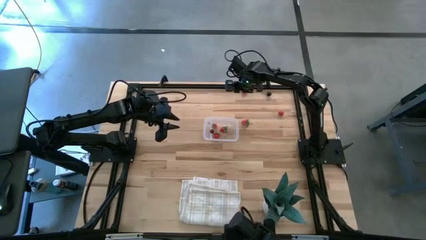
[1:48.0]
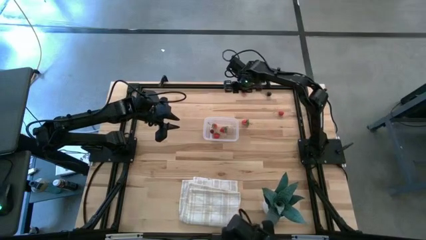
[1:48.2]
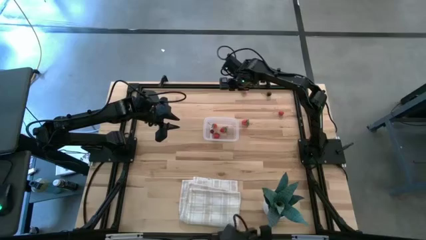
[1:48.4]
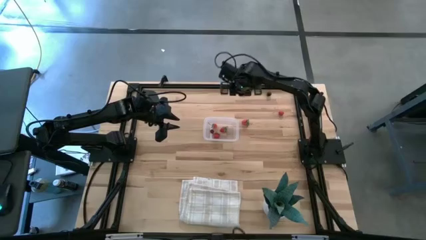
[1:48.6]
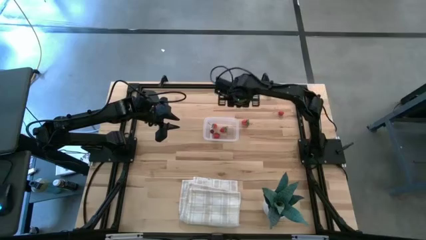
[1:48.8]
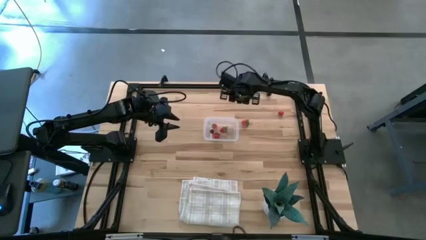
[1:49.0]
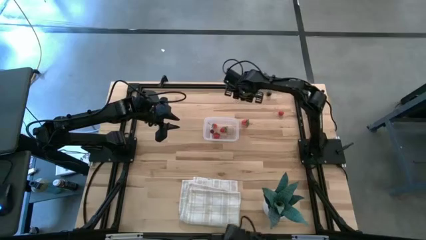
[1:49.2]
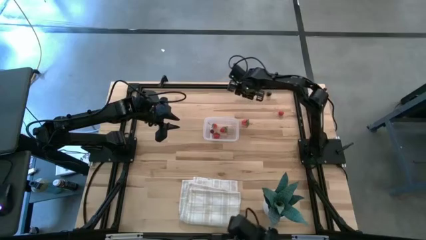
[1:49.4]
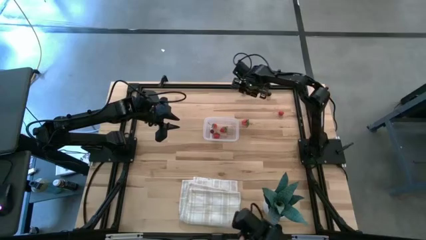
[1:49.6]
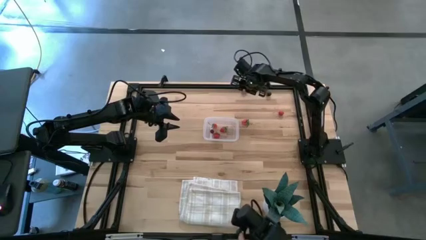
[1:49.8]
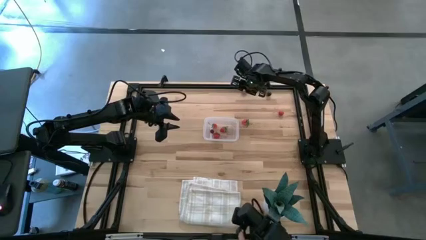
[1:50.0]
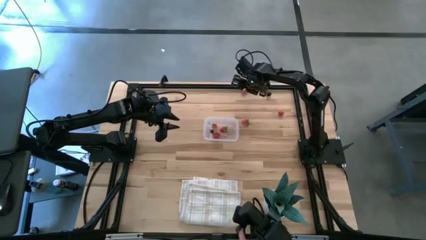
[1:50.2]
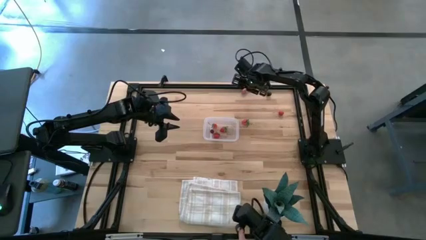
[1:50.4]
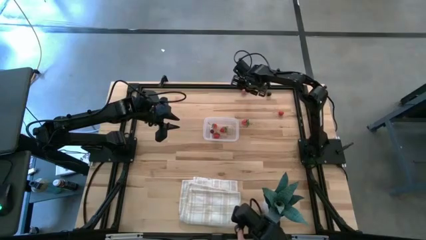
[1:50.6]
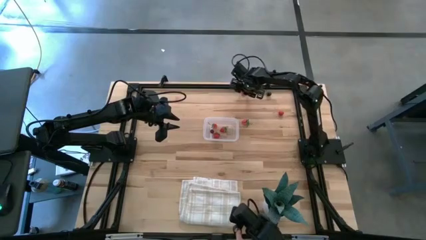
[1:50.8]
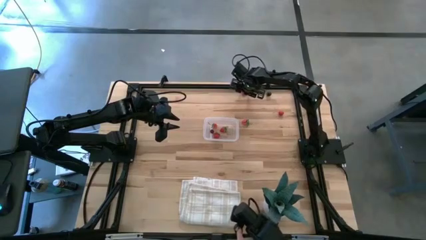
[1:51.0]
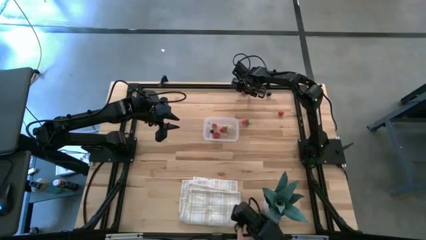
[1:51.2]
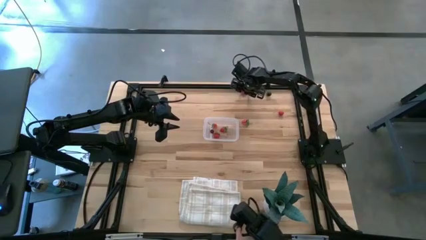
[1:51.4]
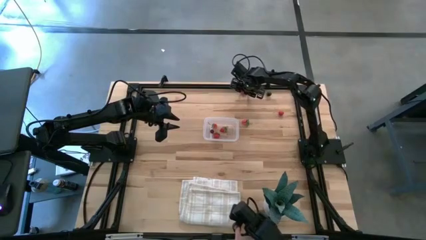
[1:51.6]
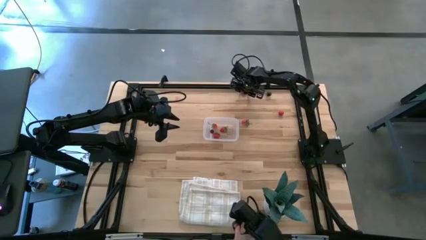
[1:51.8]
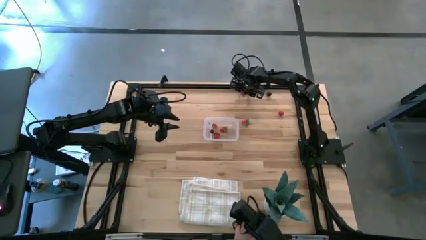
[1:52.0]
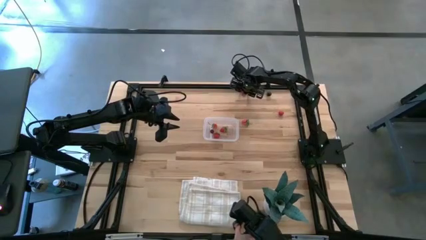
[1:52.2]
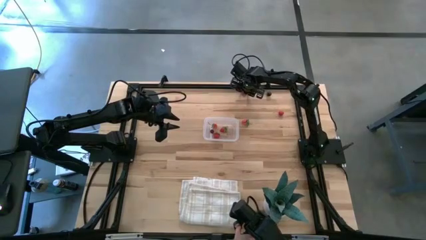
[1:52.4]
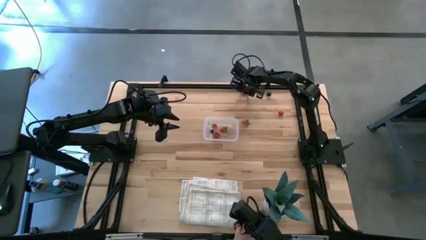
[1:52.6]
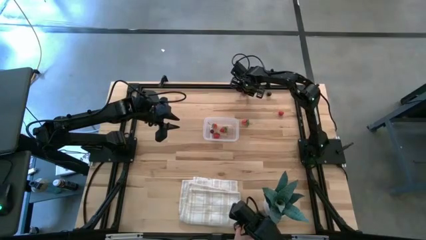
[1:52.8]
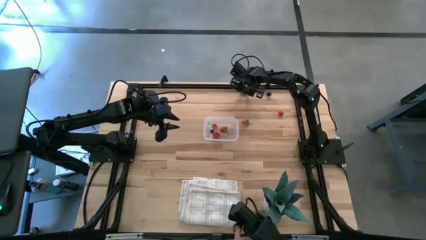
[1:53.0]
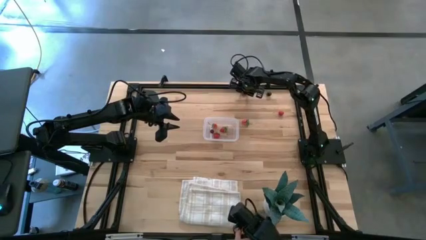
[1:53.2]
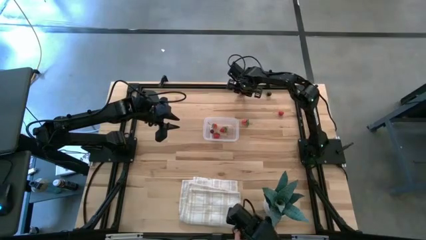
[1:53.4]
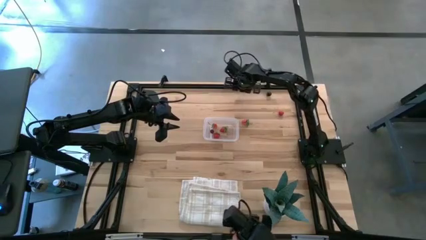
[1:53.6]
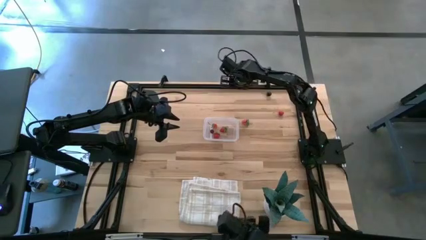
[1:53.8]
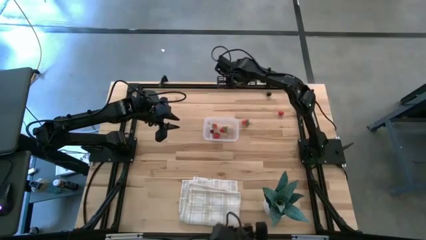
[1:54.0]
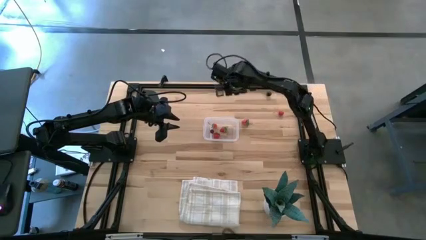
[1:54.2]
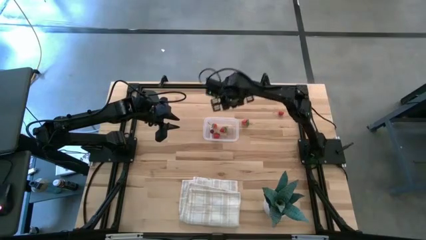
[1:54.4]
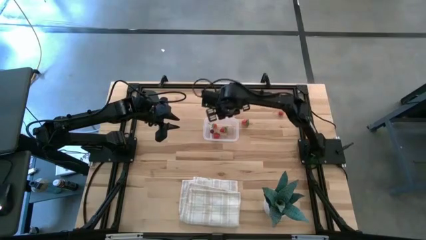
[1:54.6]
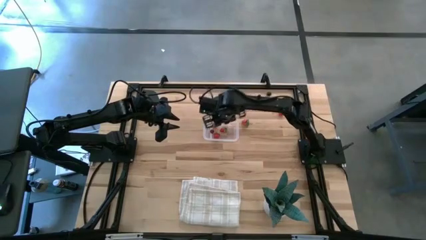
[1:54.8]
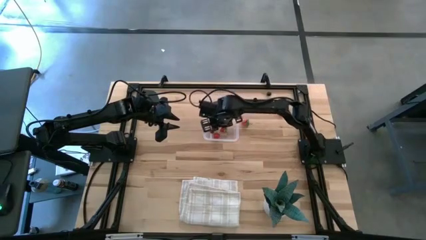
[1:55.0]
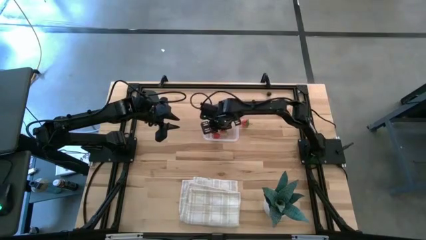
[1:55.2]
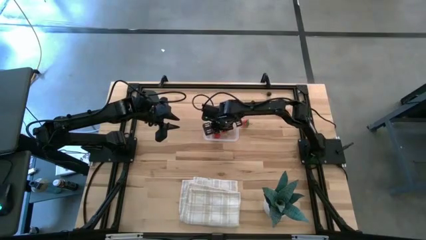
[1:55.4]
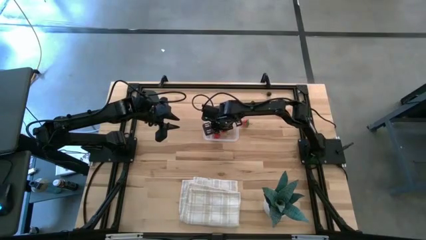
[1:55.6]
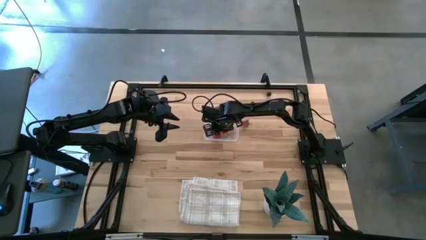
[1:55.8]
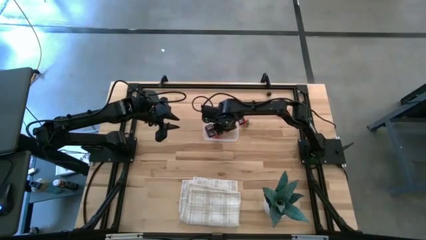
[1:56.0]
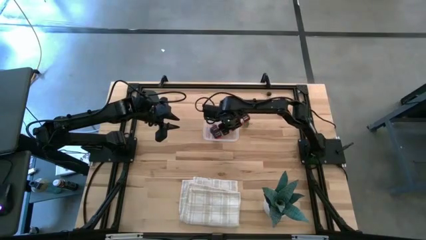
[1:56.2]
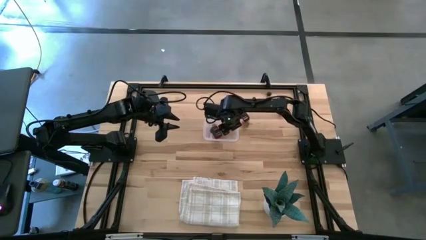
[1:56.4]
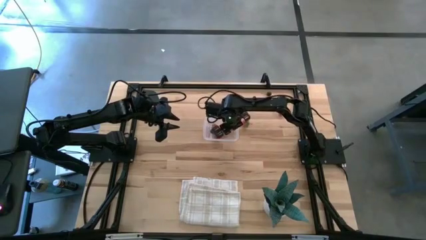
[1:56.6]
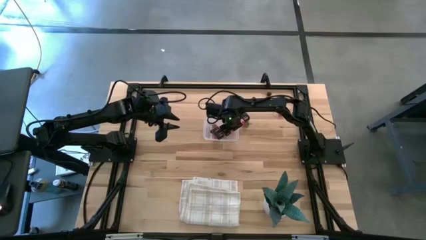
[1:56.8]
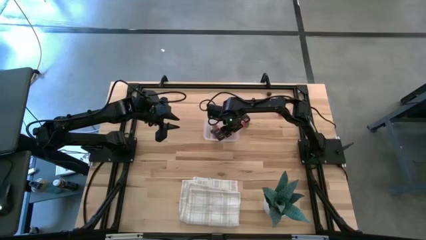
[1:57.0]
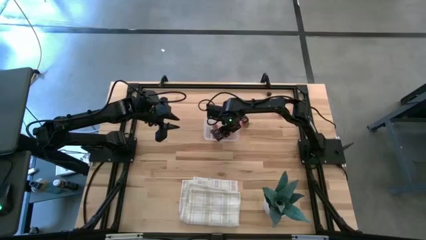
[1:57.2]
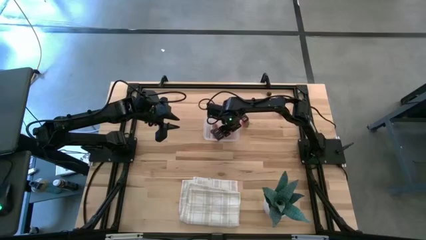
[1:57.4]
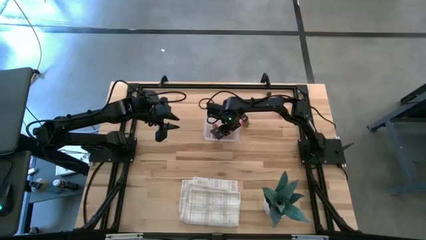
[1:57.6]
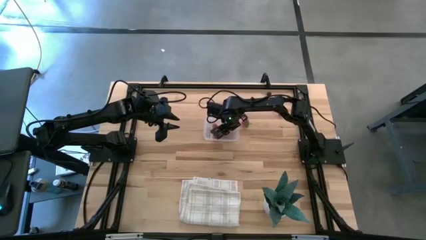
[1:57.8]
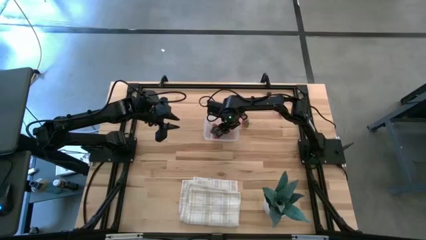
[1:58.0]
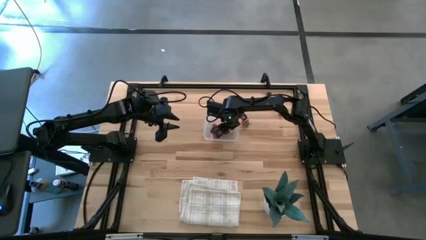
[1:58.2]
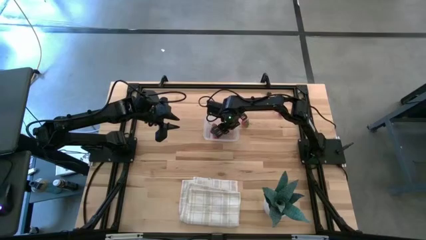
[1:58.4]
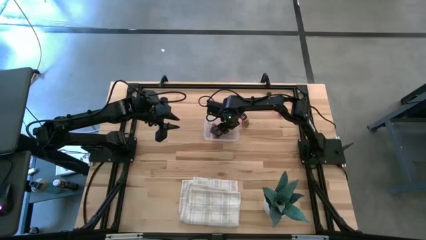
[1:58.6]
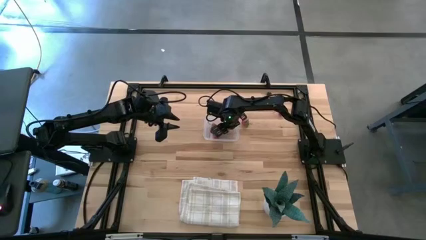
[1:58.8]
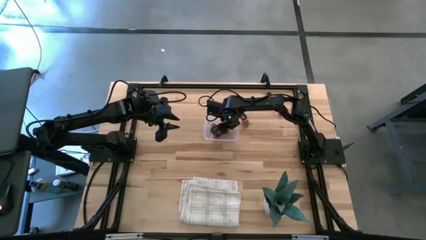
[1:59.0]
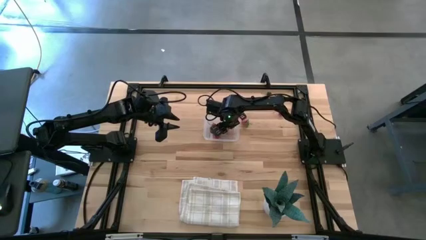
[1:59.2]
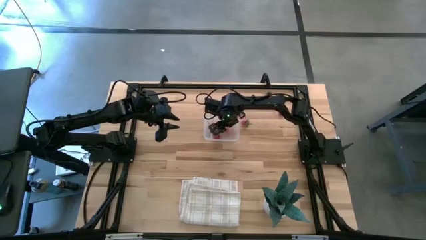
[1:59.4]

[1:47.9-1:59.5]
Task: Pick and placing Produce into tupperware
Put the apricot into the transparent bin
